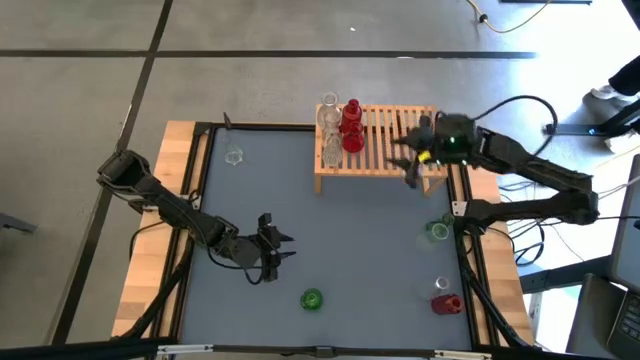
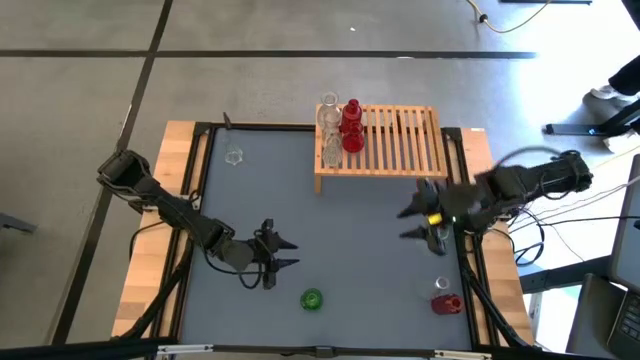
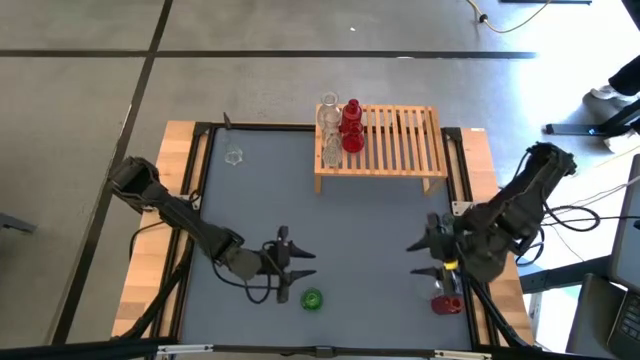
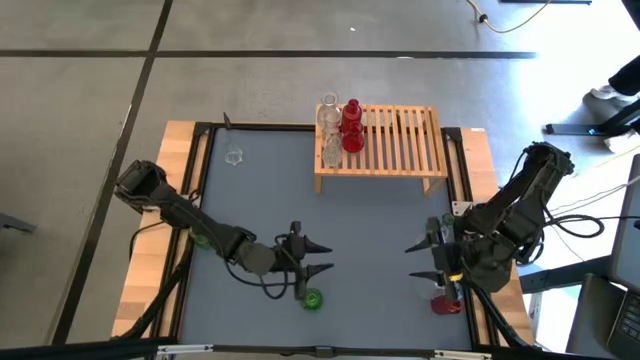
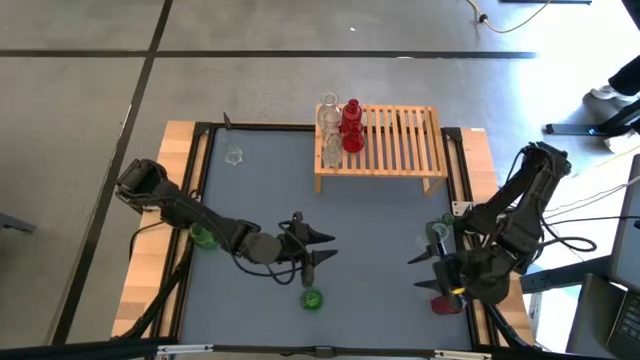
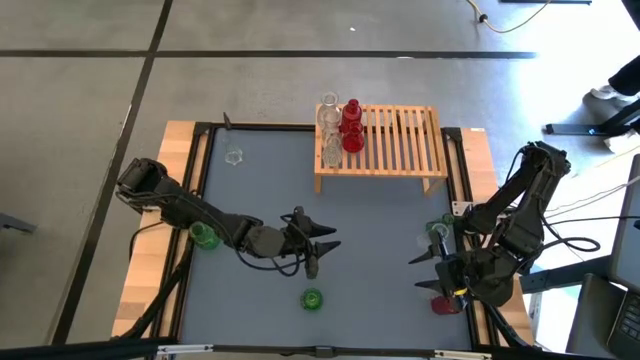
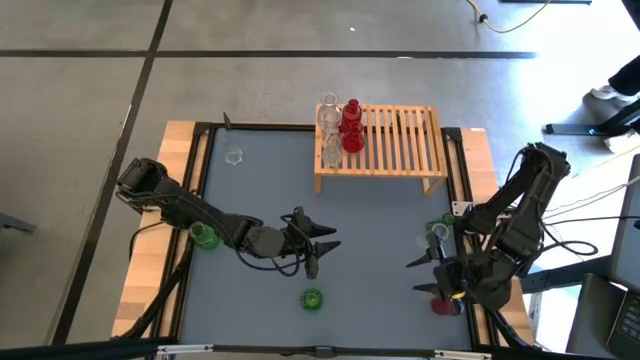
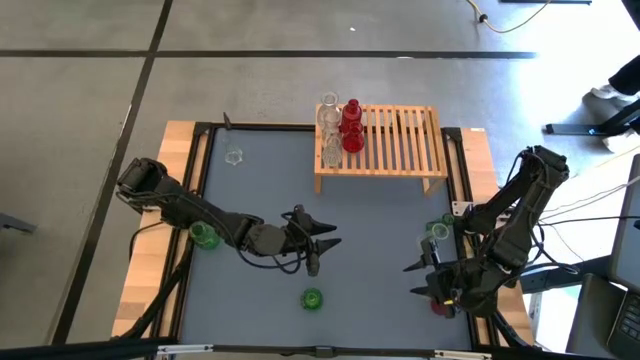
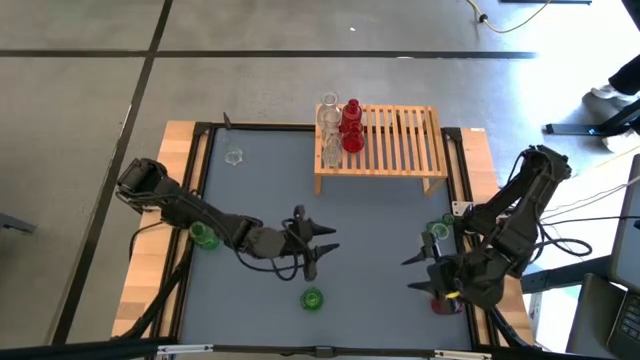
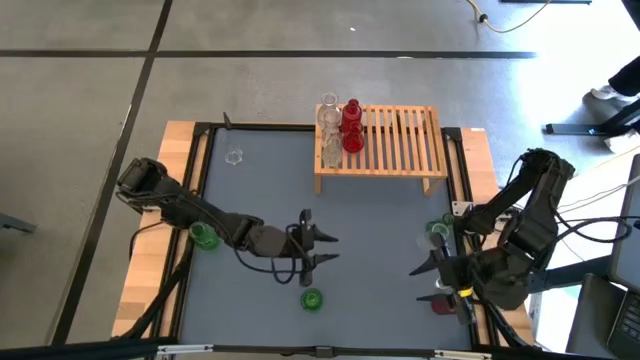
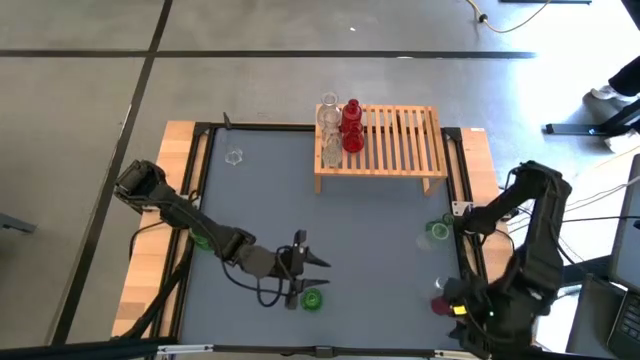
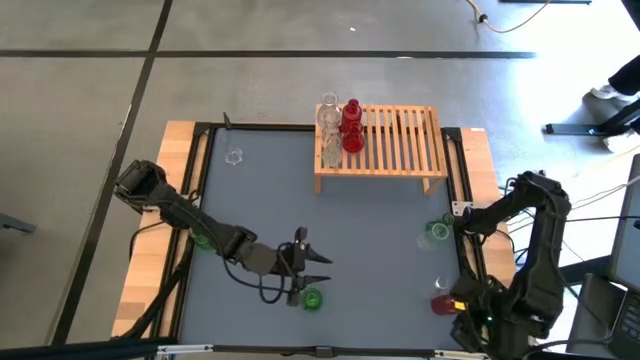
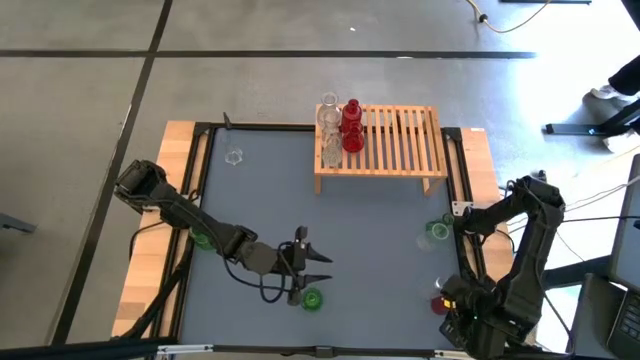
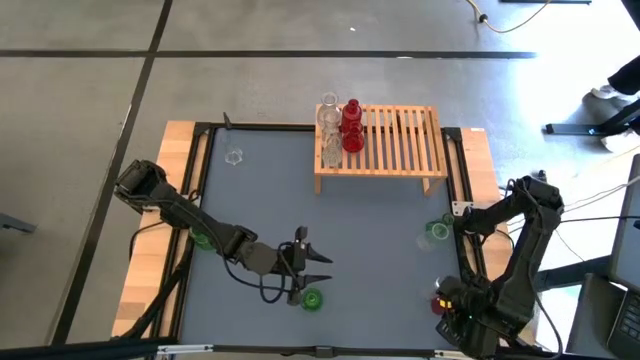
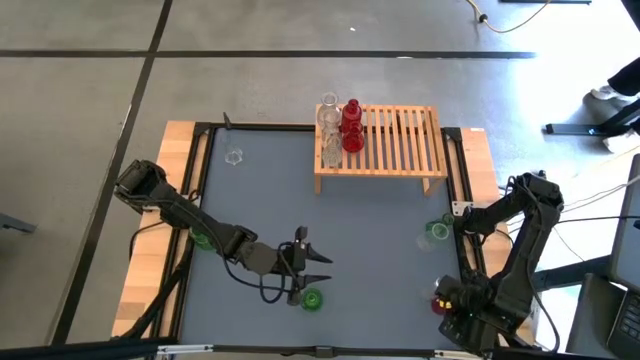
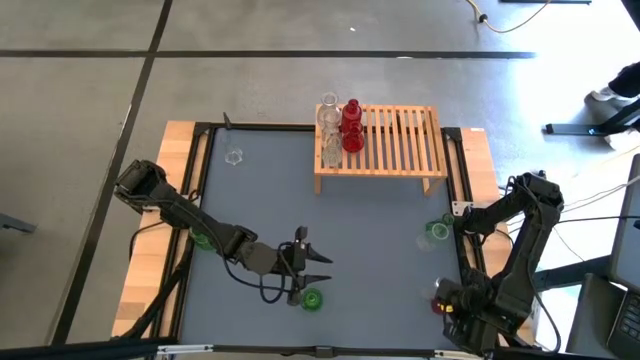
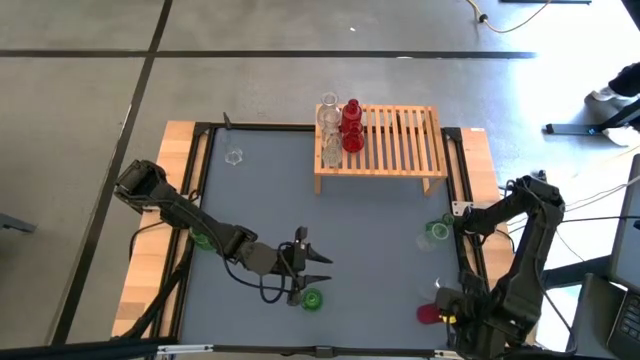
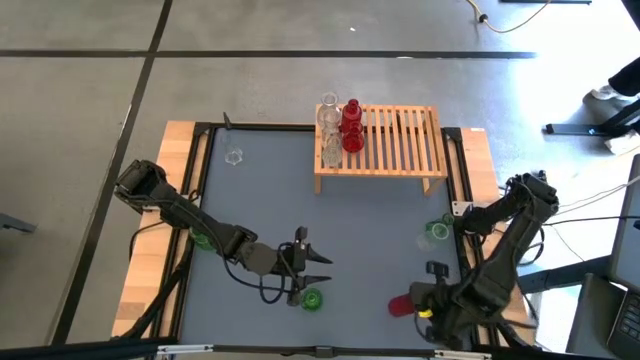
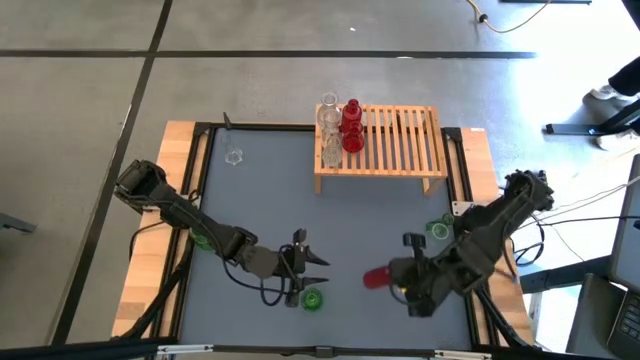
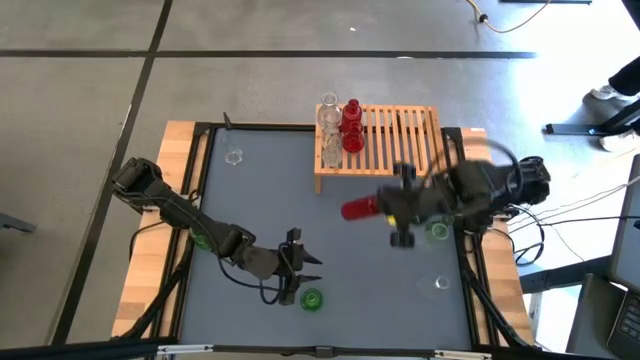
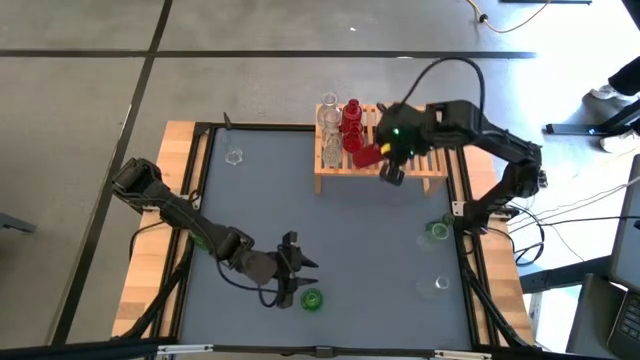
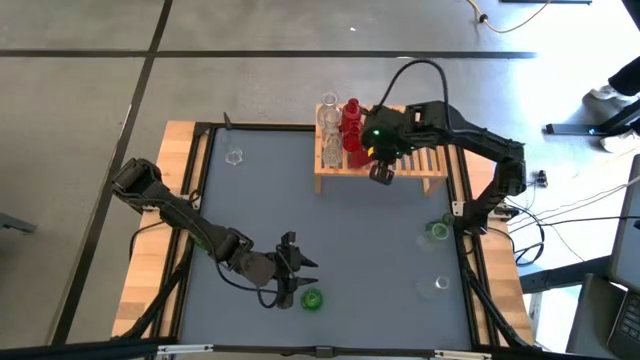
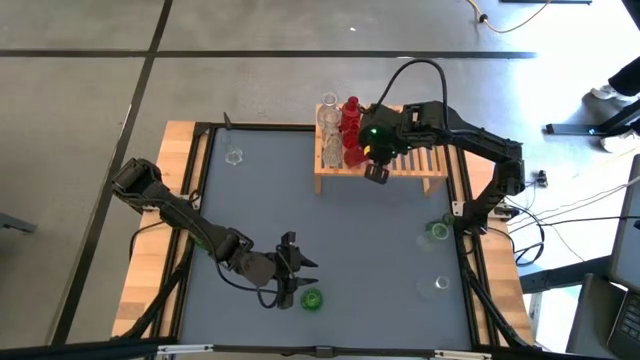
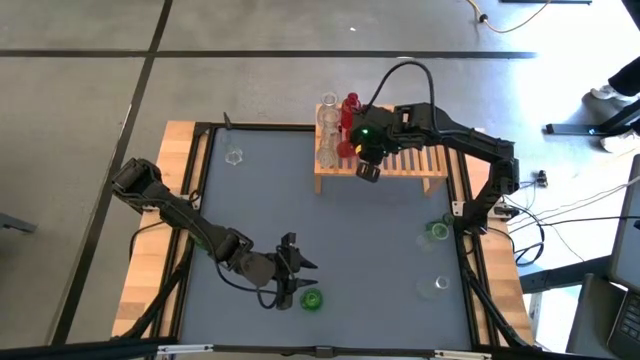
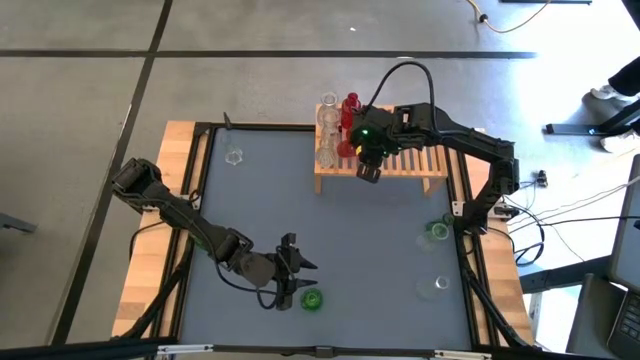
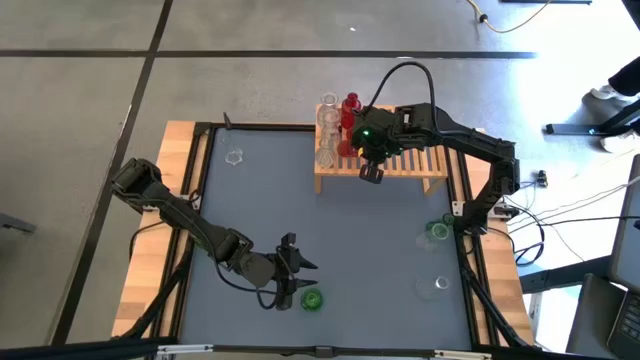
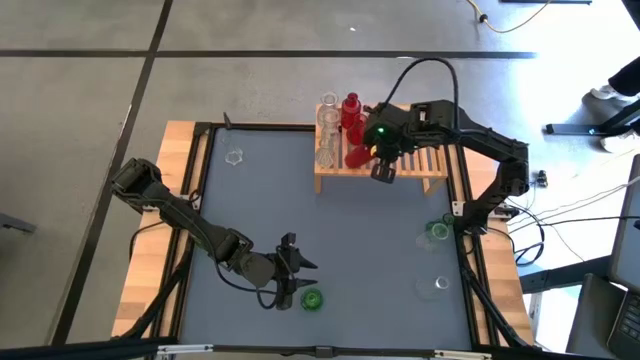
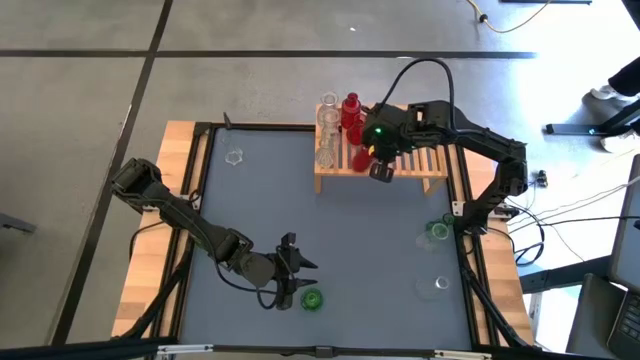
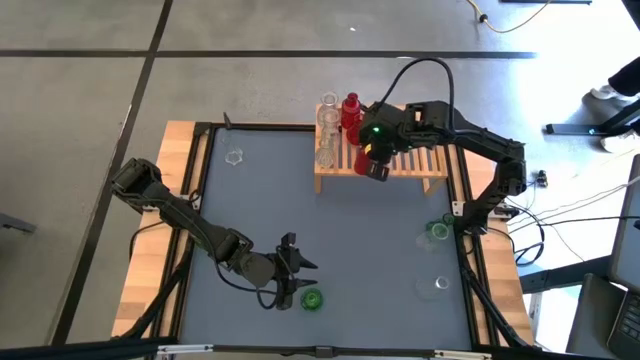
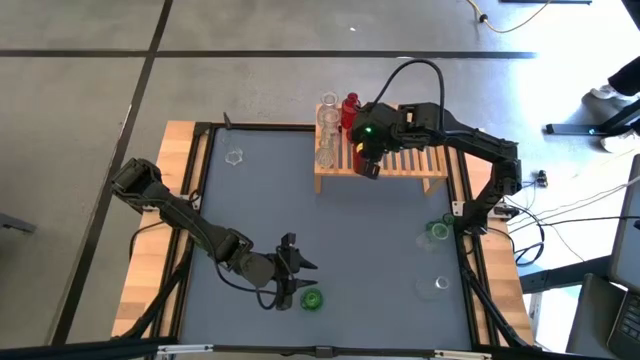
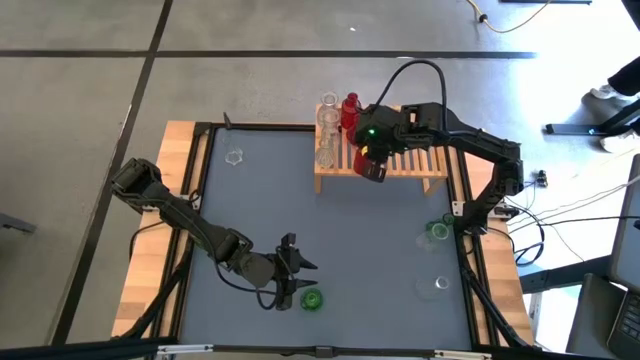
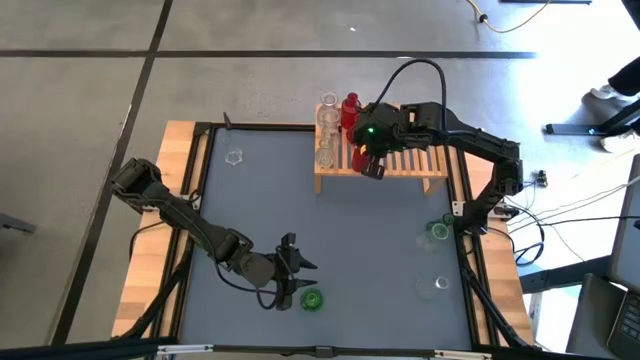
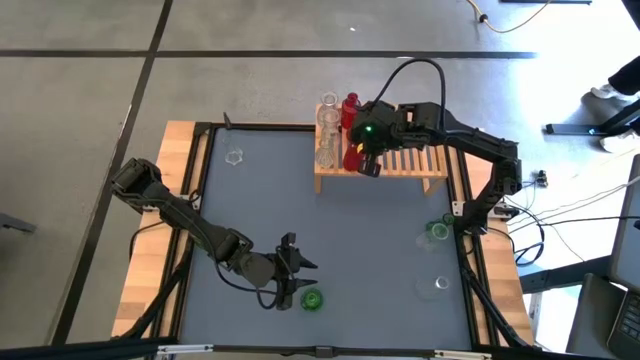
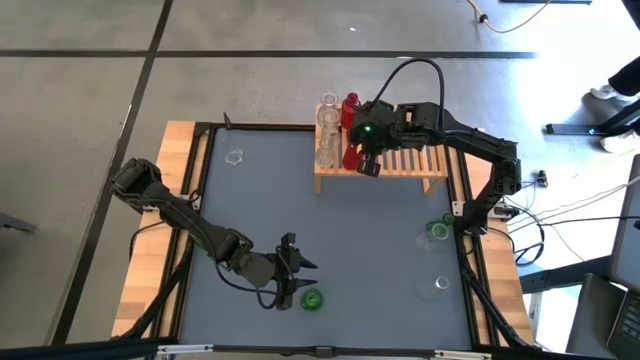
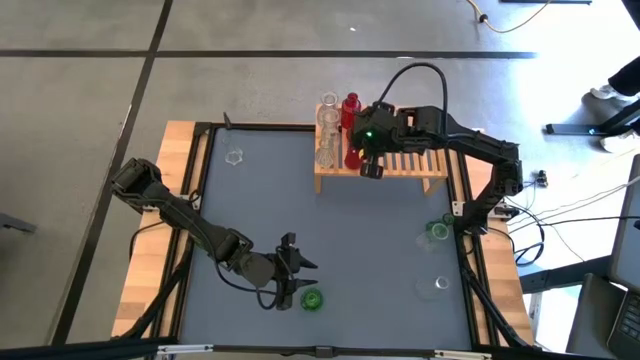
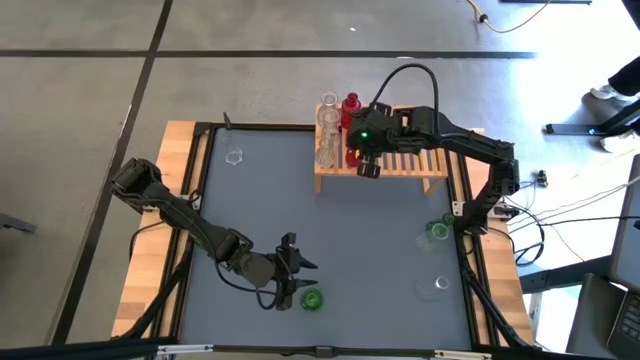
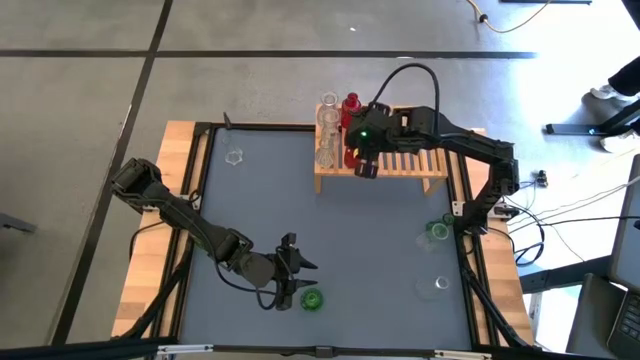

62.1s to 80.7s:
Task: sort vases onto shelf
Put the red vase onto the shelf aligned with the other red transparent vase

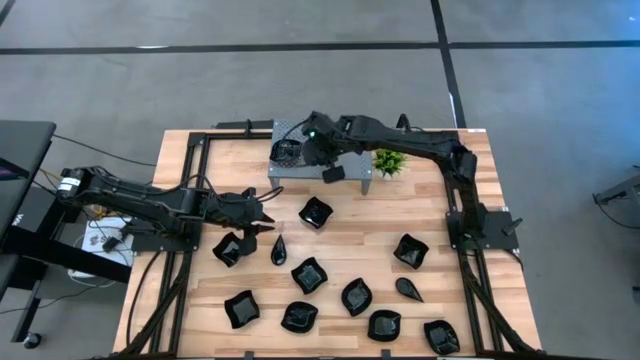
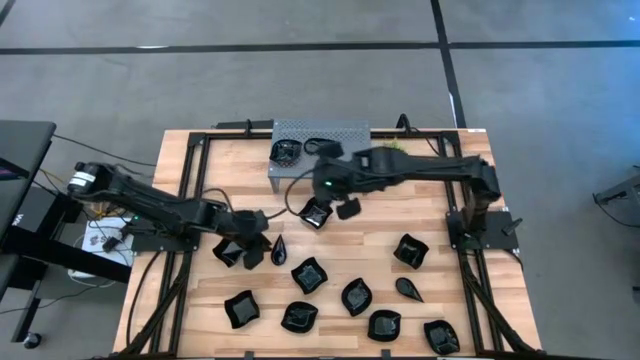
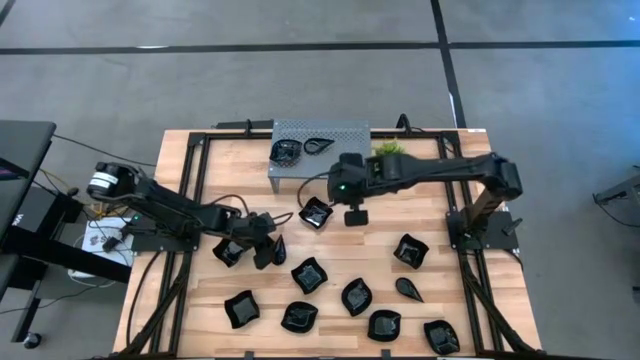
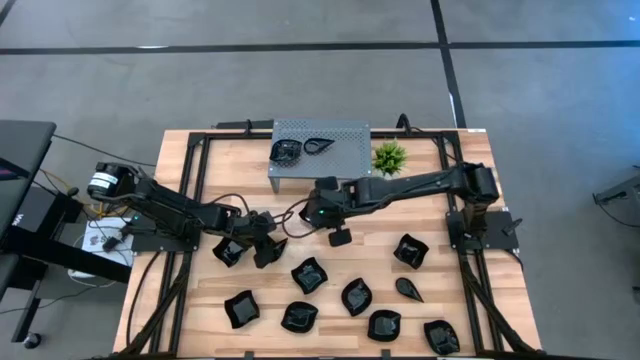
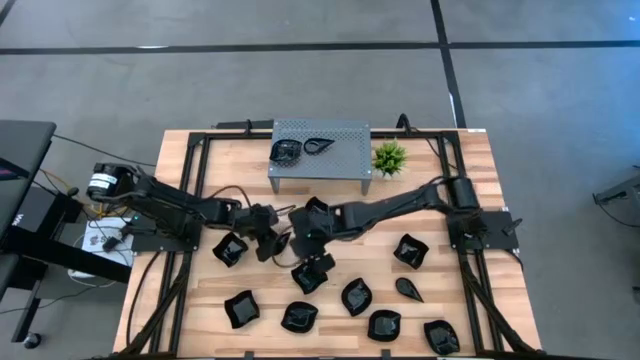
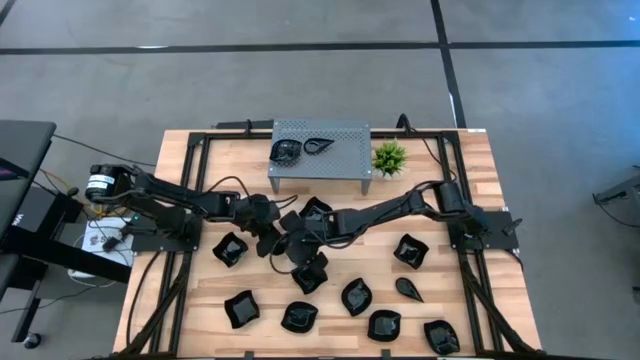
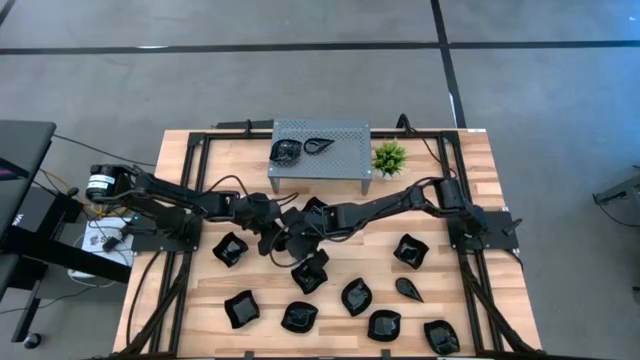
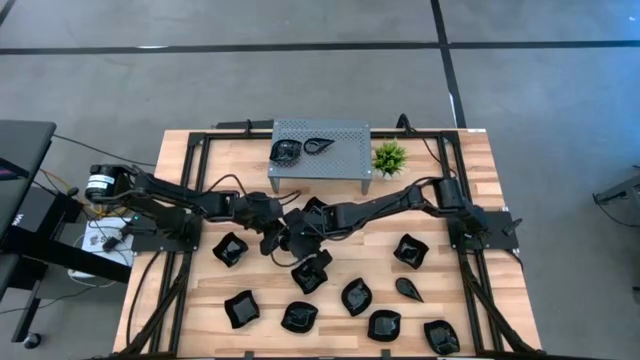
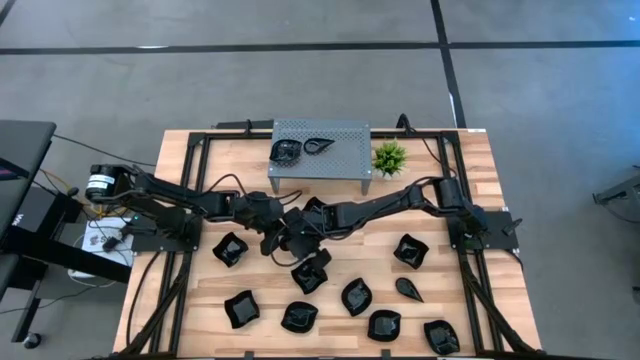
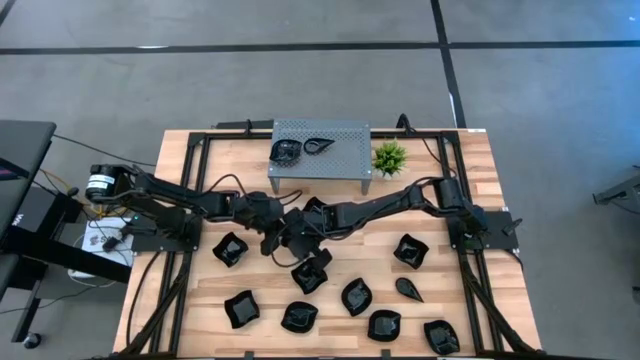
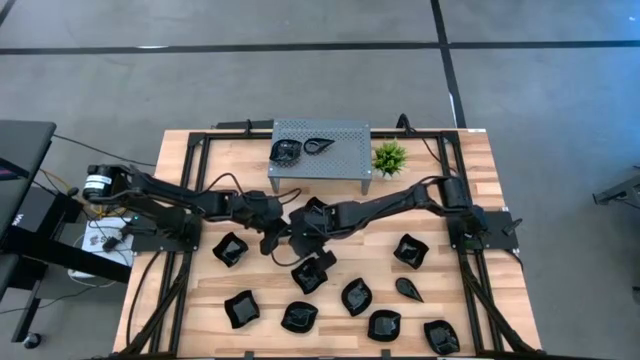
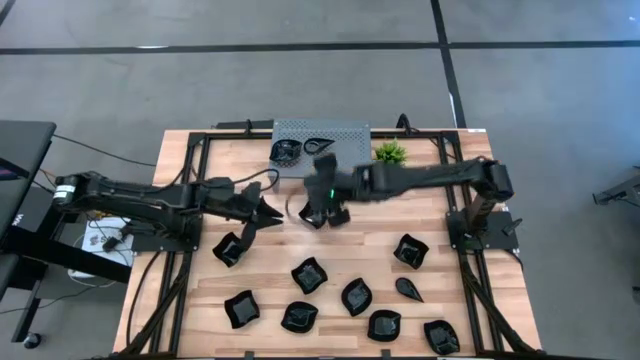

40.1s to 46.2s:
Task: Pick & Place Mini shaped plates
Stack the drop-shaped plate on top of the drop-shaped plate on the shelf
